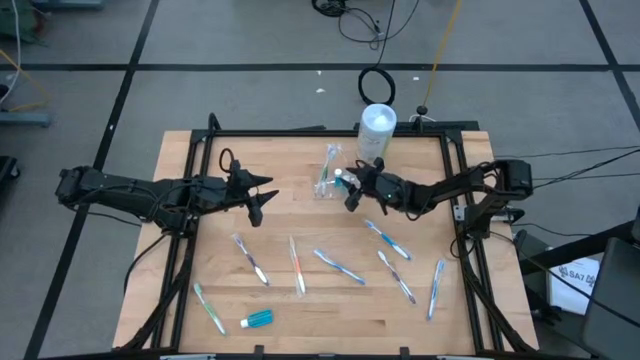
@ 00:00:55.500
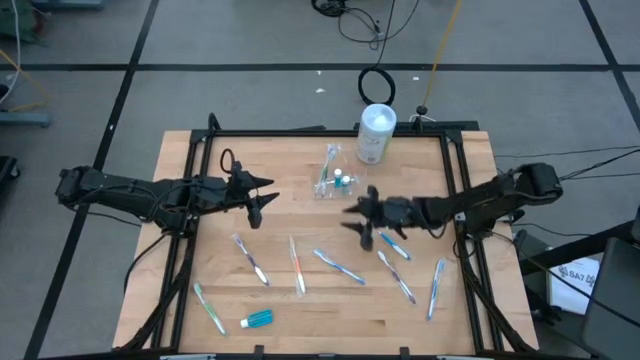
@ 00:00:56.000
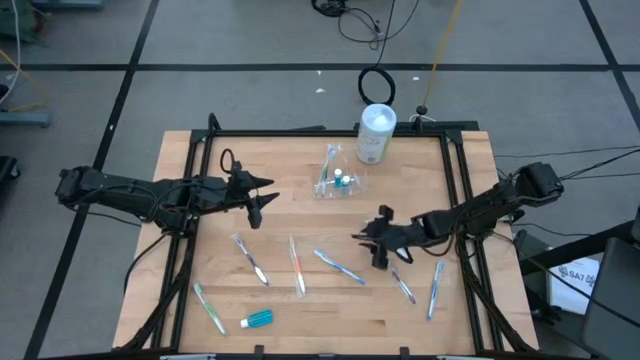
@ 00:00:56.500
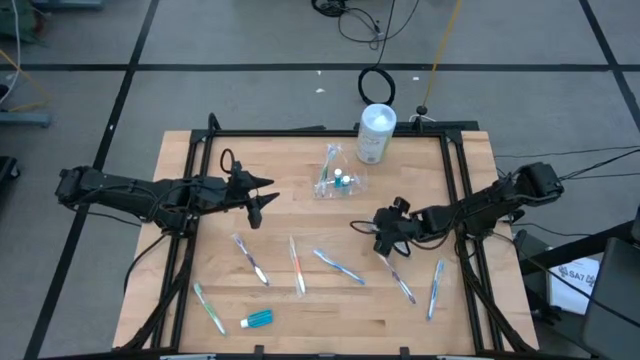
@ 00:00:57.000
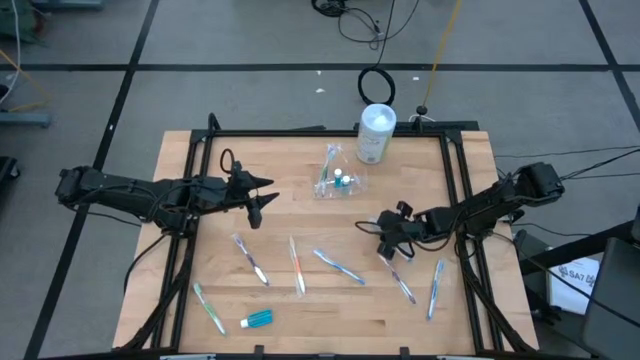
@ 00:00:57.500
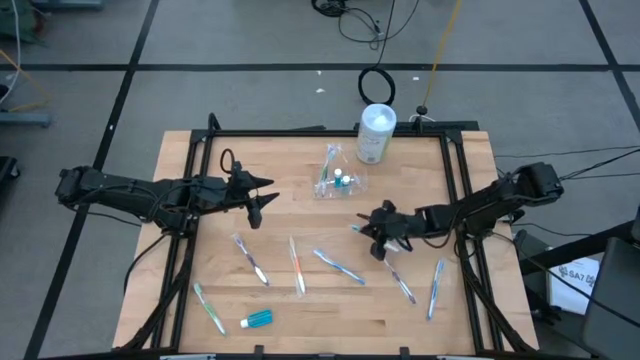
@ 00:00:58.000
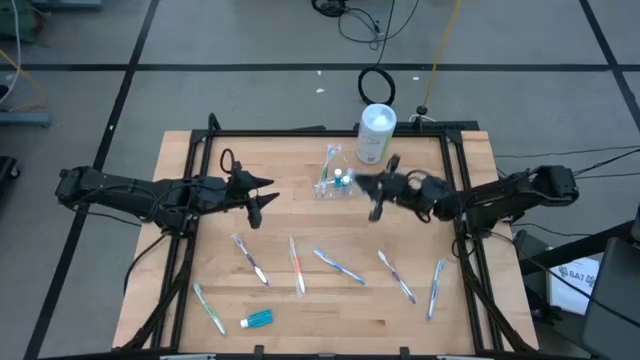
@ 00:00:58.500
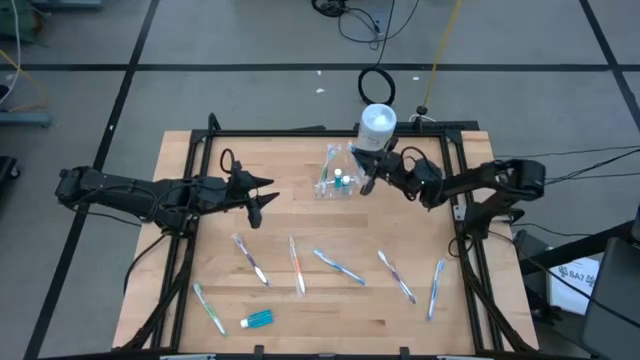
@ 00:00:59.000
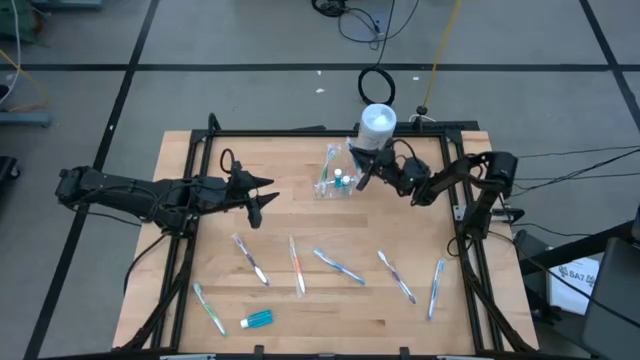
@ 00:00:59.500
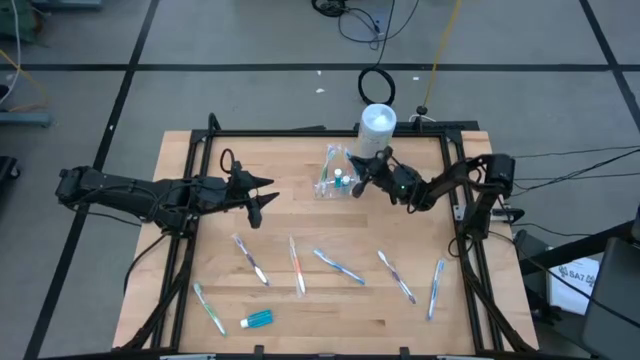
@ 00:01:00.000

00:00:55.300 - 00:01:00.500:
Task: Pick & Place toothbrushing station
Put the middle blue toothbrush into the transparent organizer

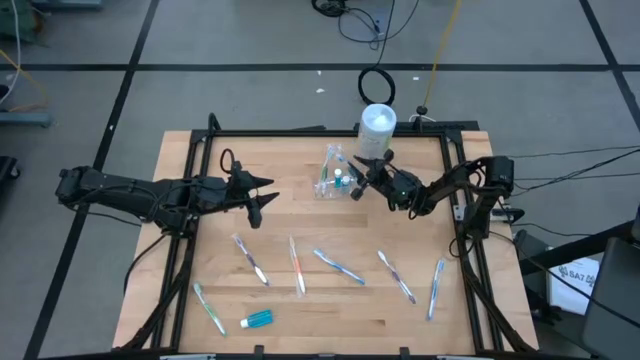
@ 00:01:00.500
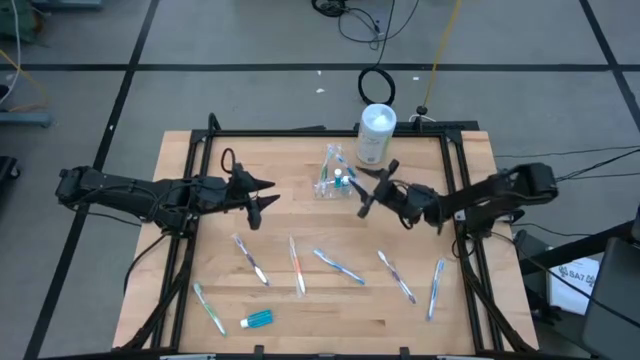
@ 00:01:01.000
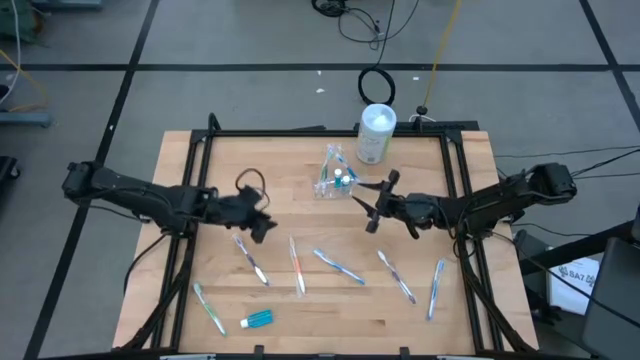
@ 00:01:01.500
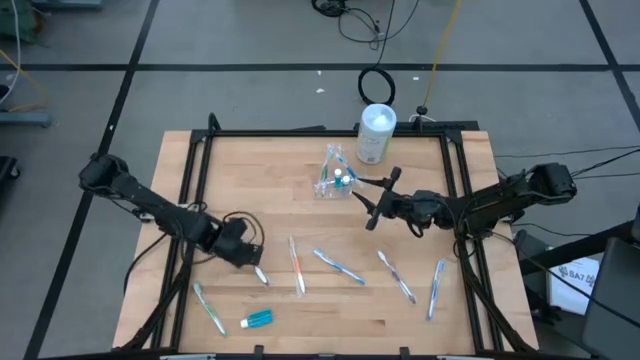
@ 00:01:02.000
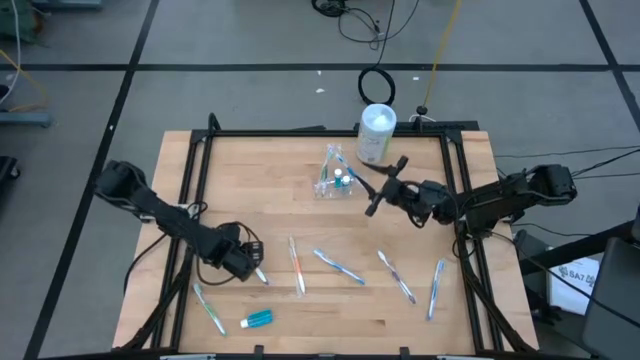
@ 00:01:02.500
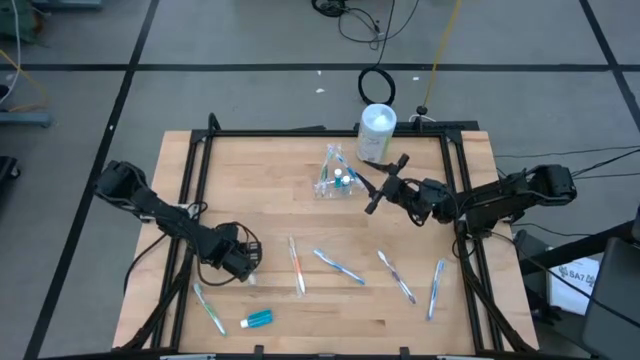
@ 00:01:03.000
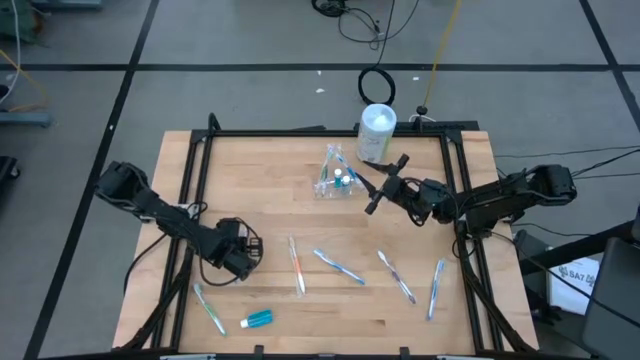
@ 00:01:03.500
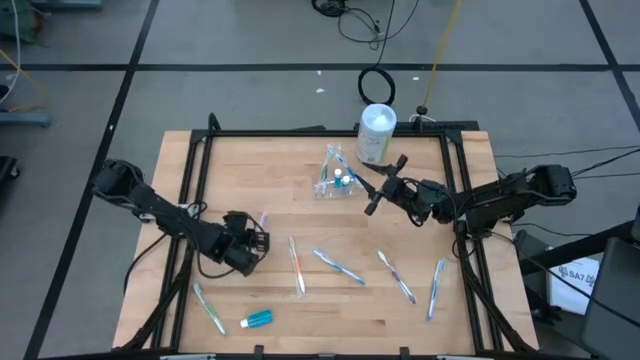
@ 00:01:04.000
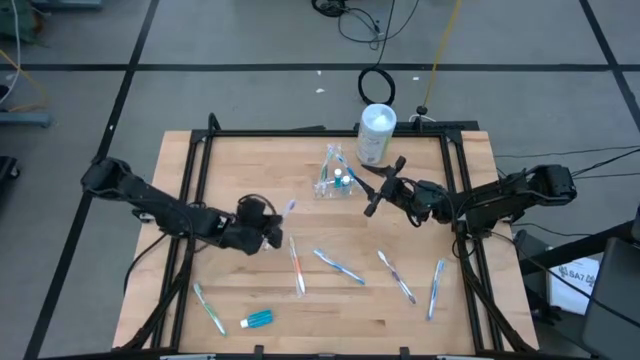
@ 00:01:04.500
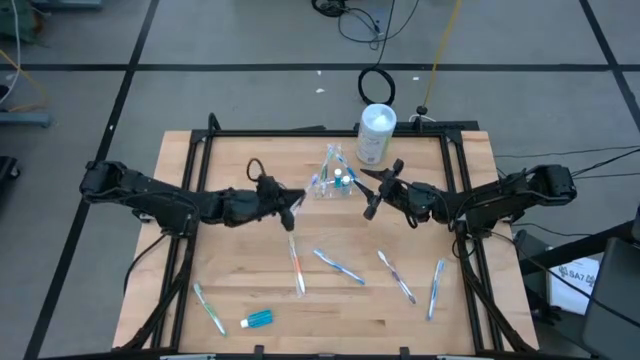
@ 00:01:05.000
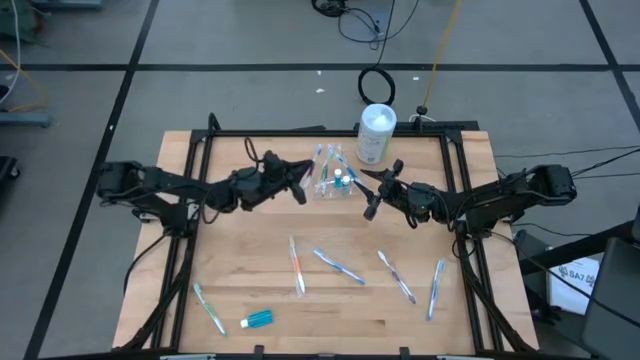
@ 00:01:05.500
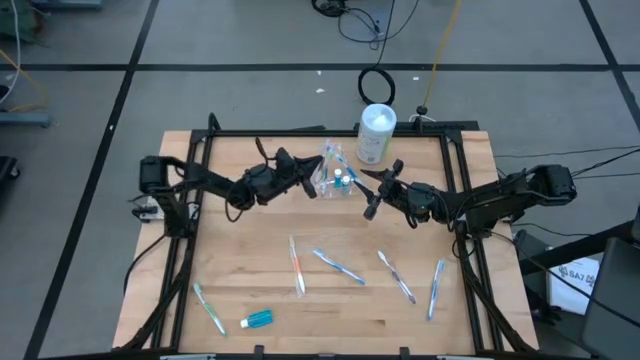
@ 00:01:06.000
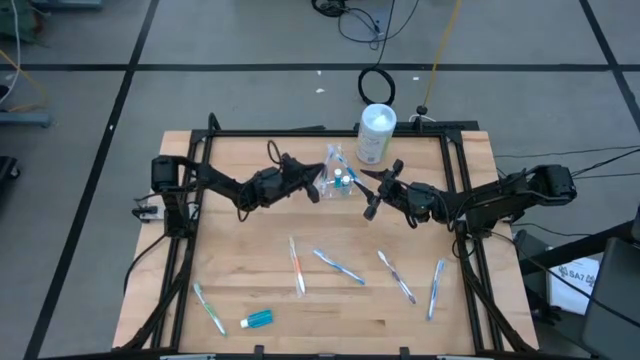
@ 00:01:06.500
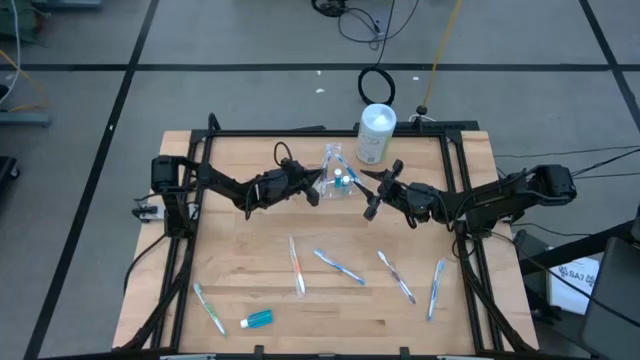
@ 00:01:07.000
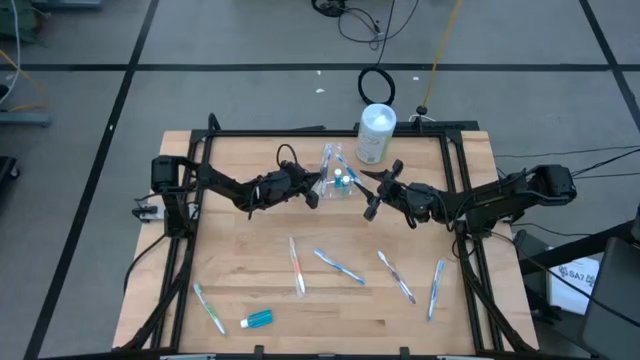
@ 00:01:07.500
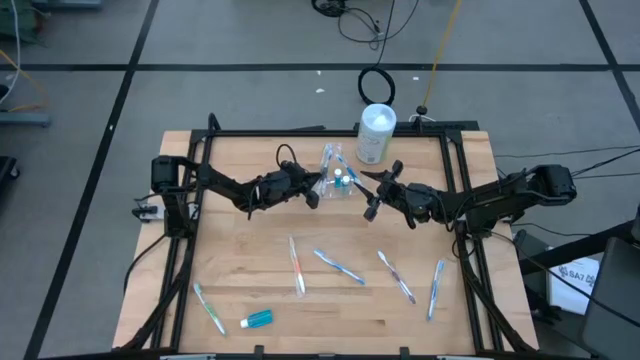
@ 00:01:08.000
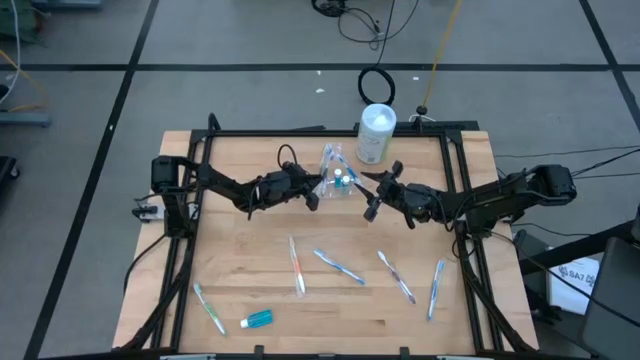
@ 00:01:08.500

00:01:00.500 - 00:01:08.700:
Put the left violet toothbrush into the transparent organizer

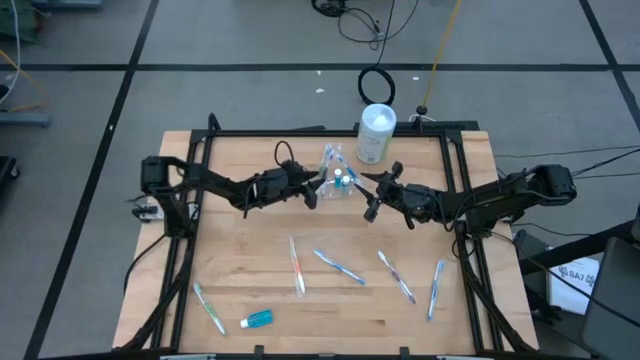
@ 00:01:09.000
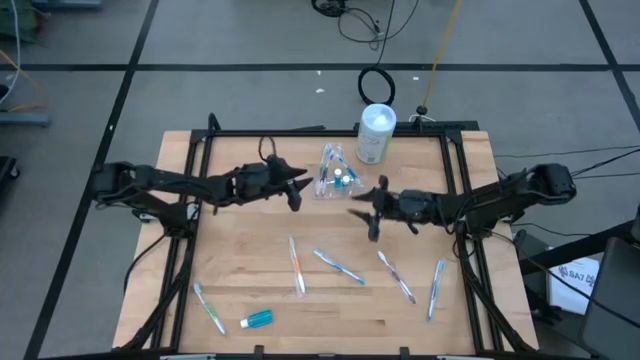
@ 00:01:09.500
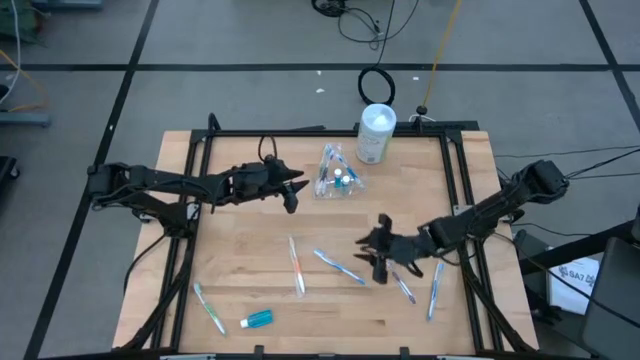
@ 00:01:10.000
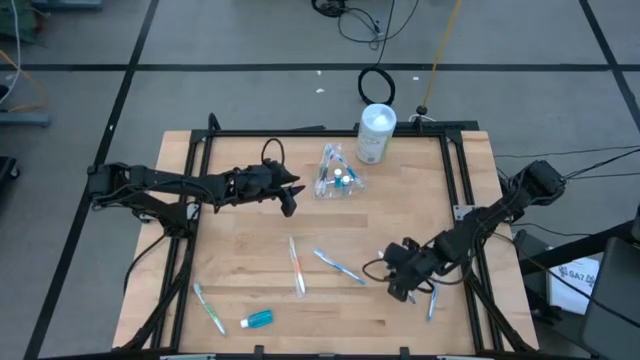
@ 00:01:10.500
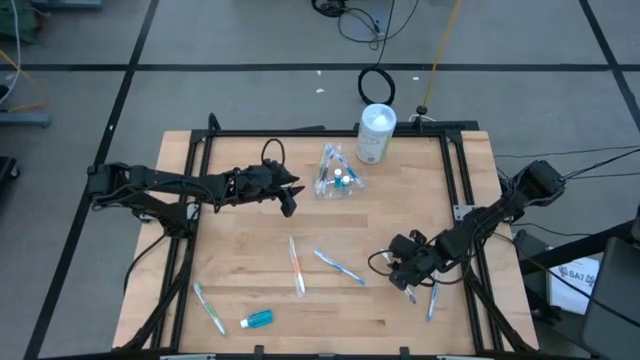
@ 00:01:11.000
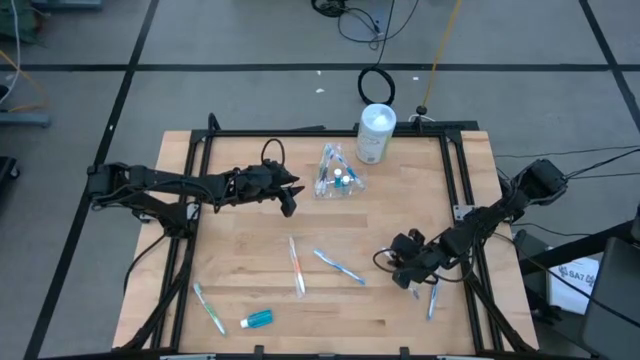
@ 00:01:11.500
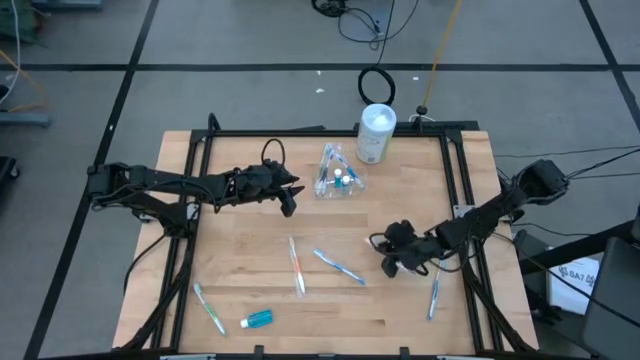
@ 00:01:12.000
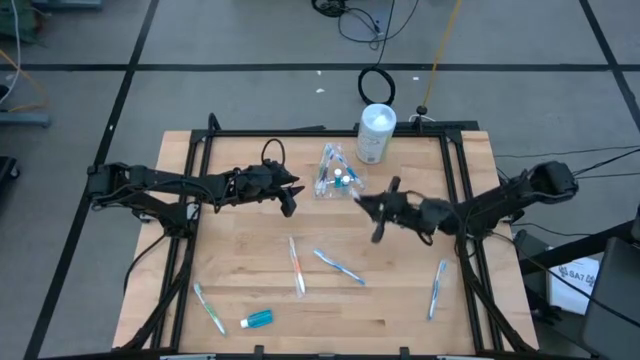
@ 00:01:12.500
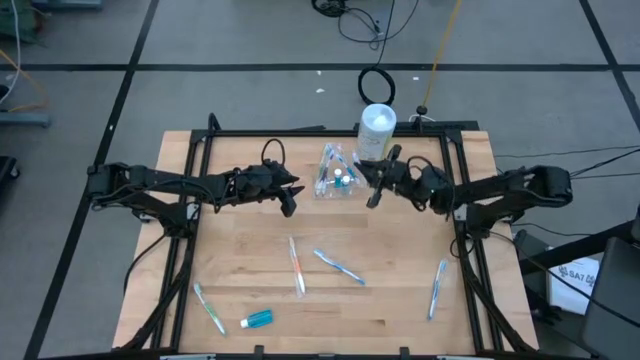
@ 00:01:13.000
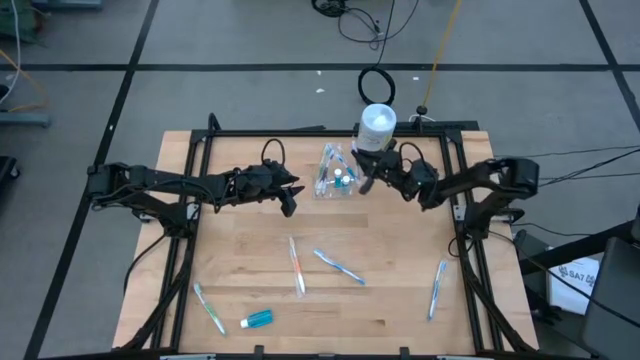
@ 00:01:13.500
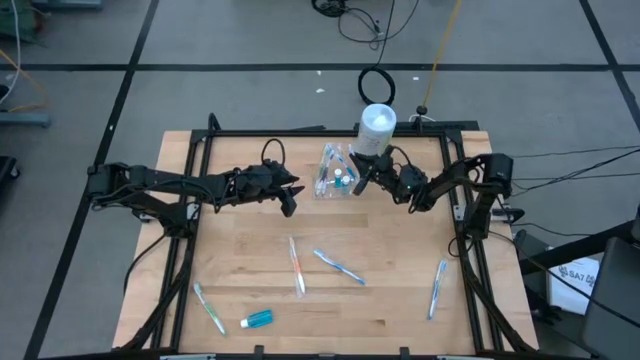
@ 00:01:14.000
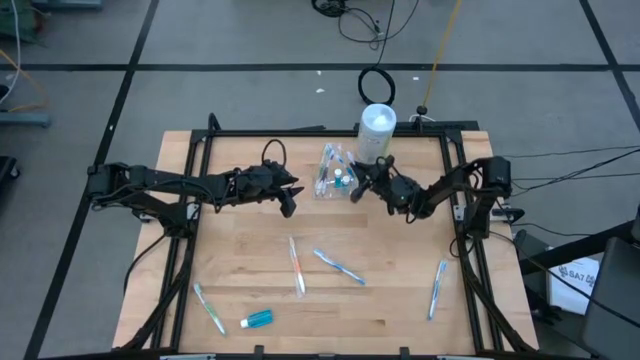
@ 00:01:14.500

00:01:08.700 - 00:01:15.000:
Put the violet toothbrush into the transparent organizer

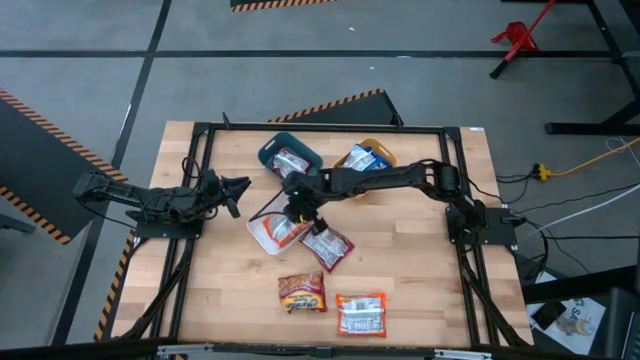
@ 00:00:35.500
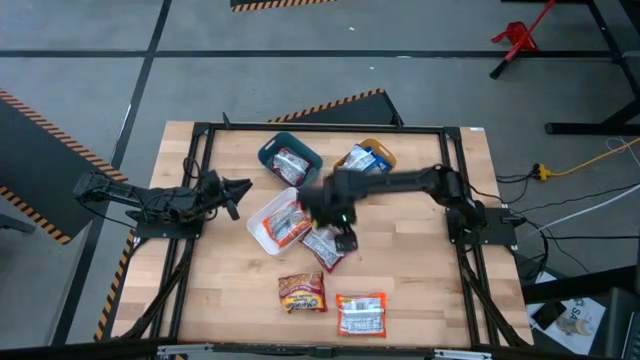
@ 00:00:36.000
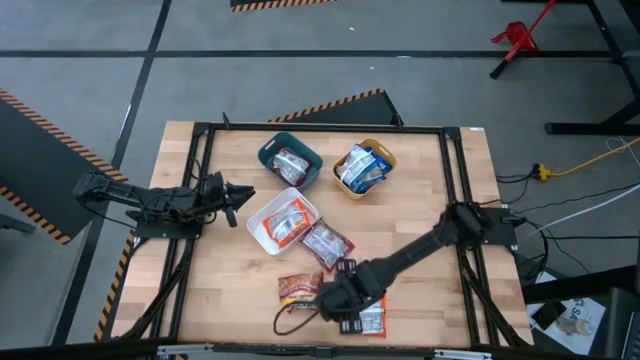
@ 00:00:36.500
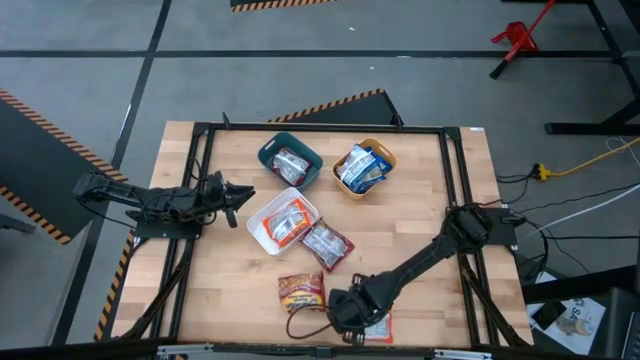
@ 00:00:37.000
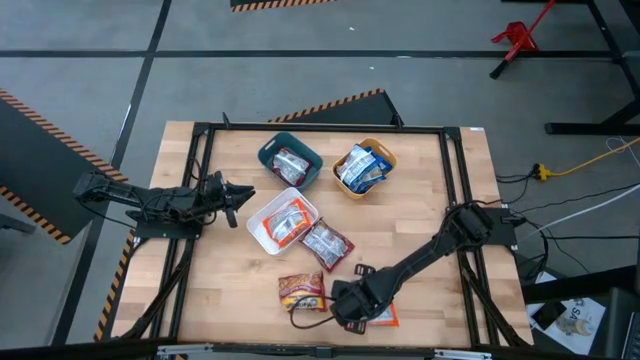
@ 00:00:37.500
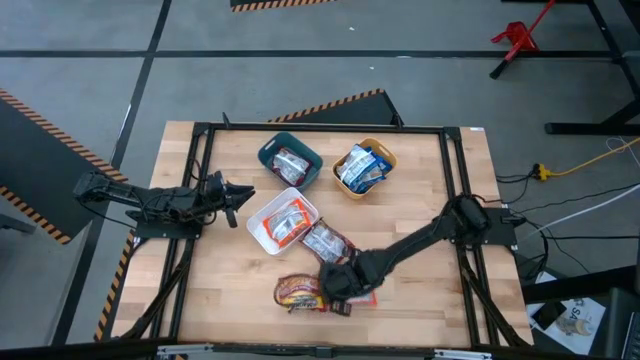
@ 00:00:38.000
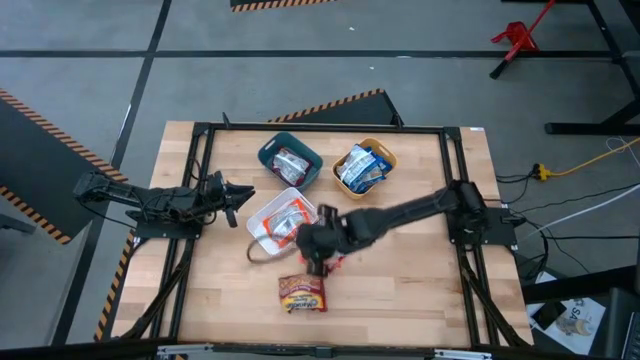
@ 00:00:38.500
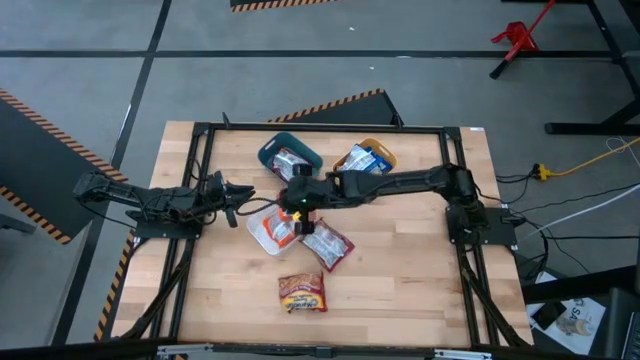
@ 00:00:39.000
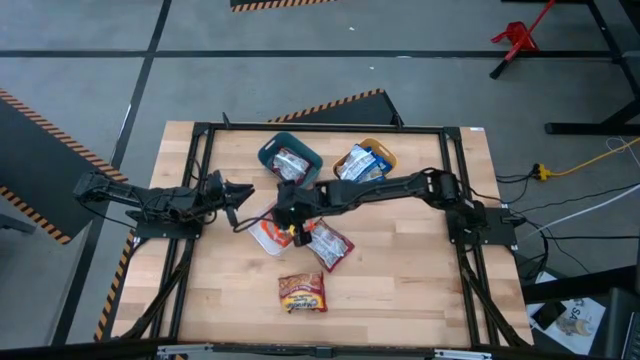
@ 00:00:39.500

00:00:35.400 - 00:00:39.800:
Task: Sort Maruchan noodles
Put the orange noodle pack into the white bin
